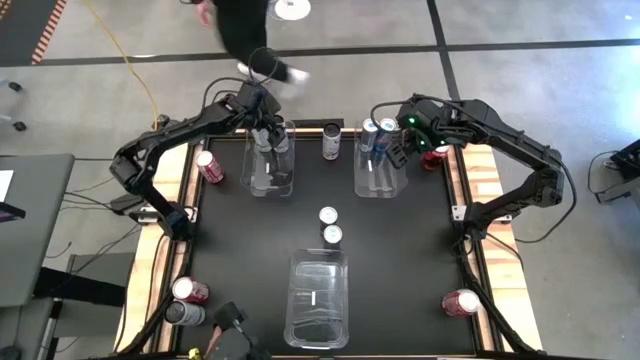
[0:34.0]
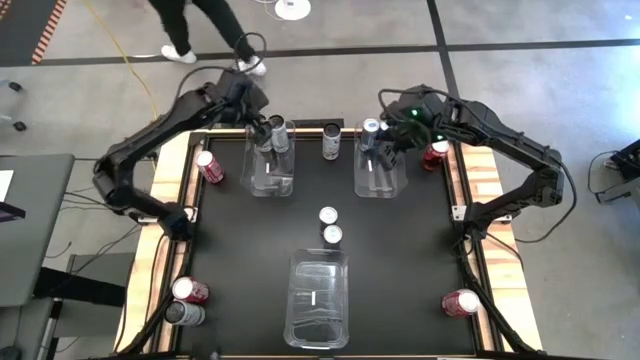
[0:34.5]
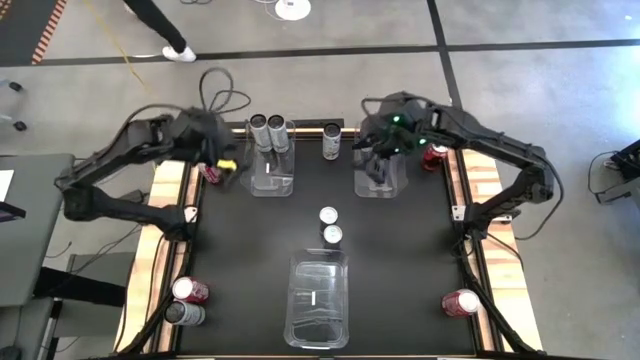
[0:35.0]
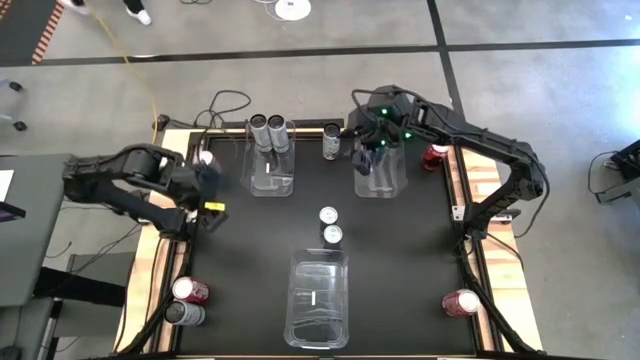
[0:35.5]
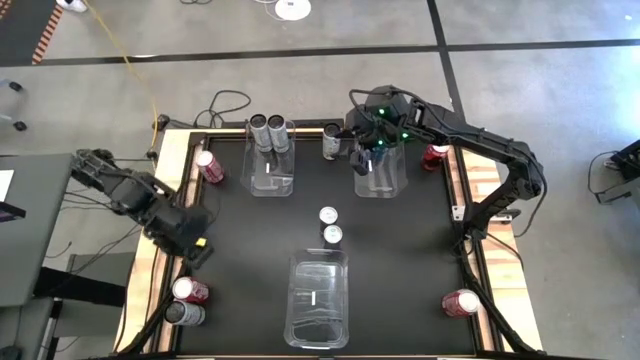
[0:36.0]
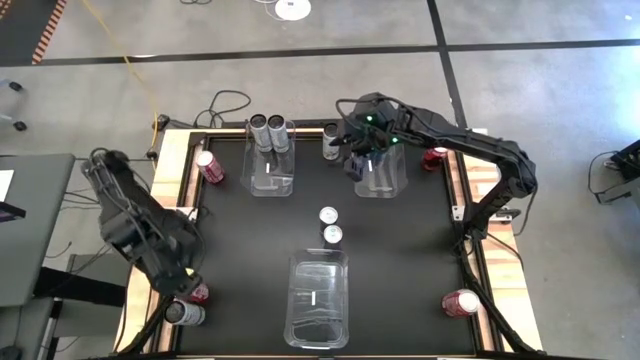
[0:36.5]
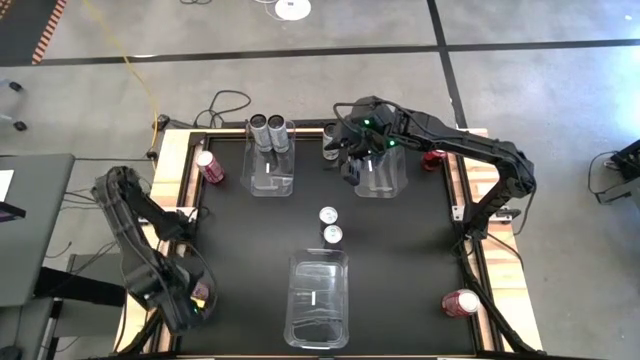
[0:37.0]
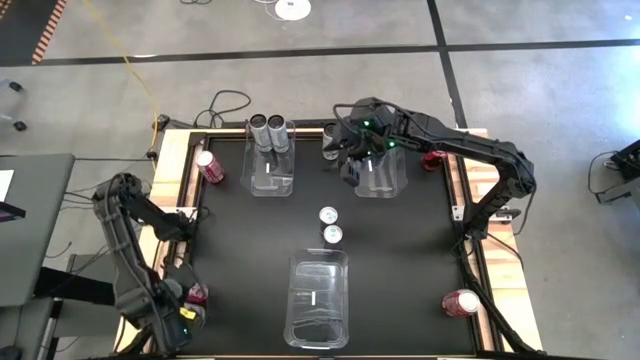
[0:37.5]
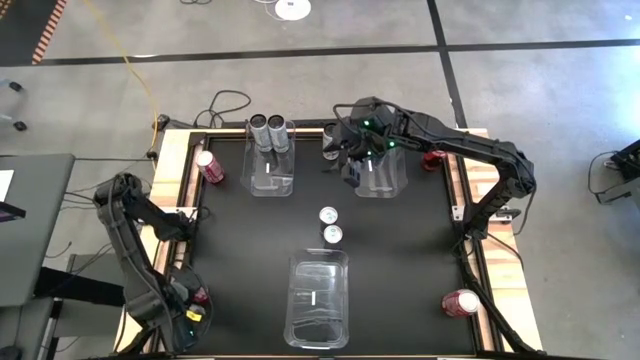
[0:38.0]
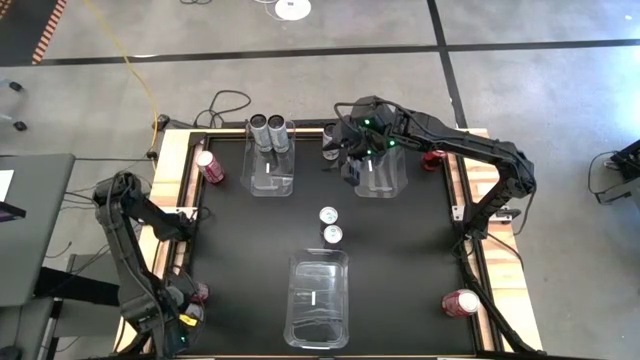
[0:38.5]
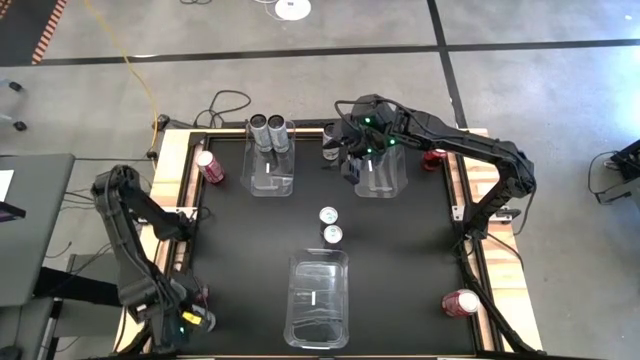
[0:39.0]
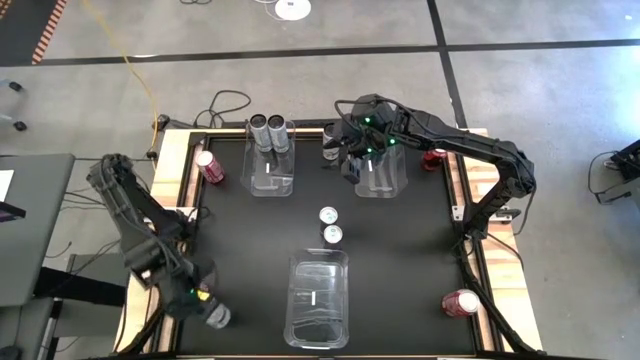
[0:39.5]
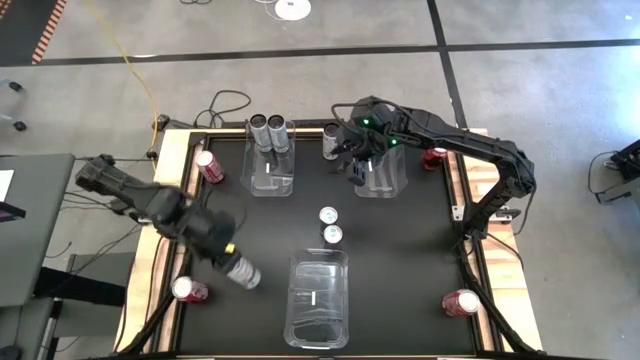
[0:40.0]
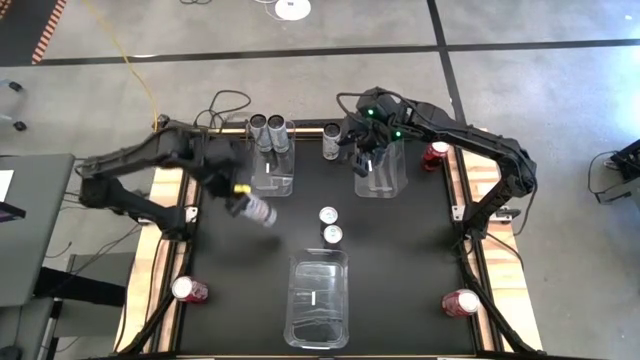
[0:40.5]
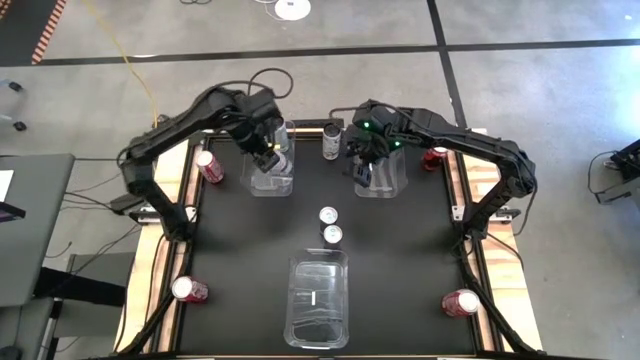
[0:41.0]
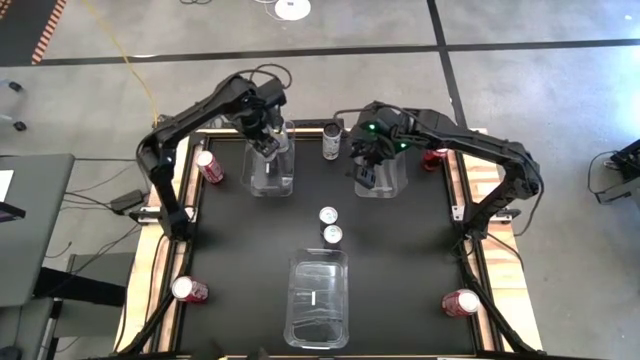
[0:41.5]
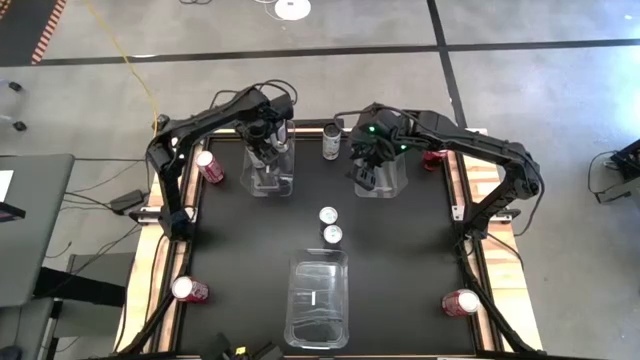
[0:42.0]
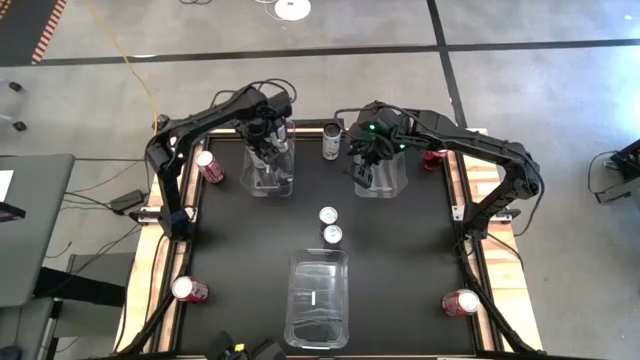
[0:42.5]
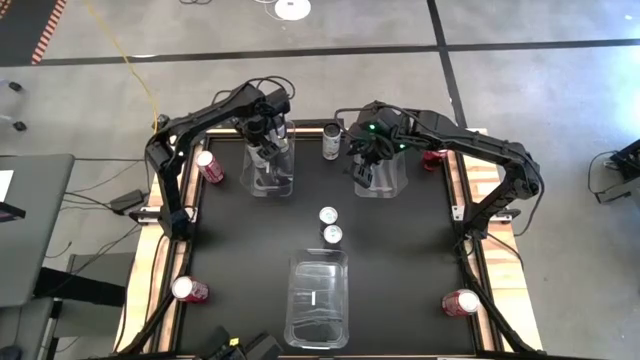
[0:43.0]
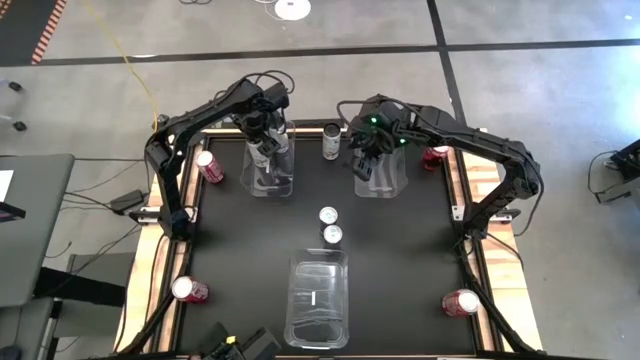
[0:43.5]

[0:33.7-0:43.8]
Task: Sort soda cans
Put the bottom white soda can into the top left transparent bin

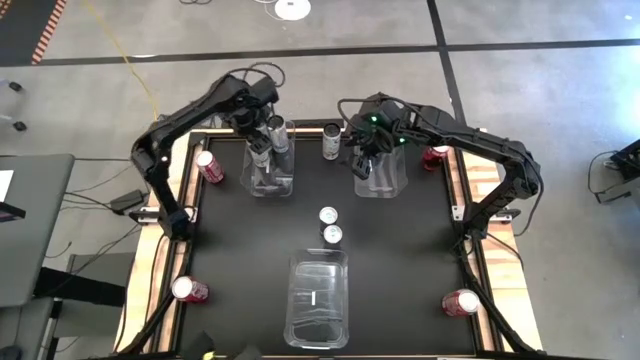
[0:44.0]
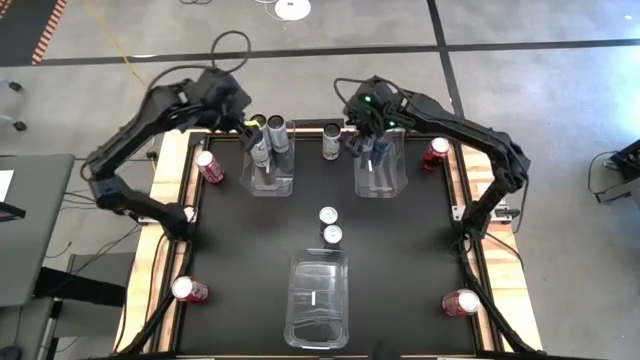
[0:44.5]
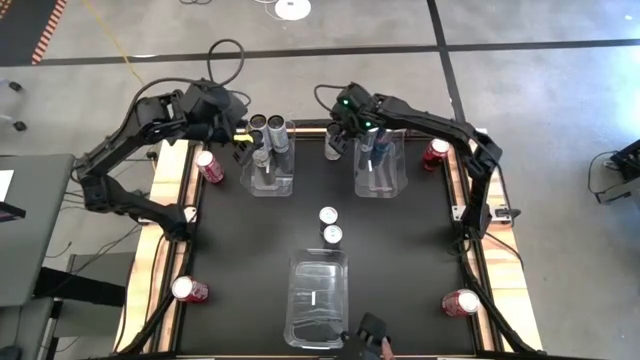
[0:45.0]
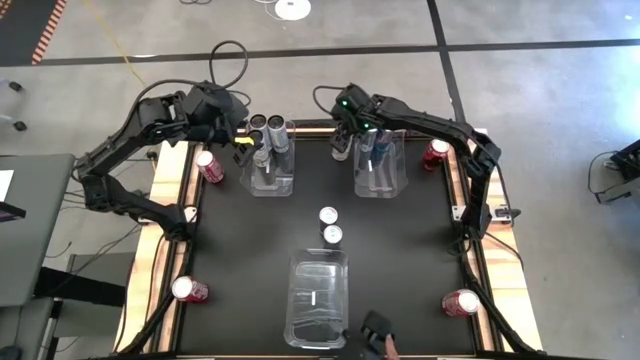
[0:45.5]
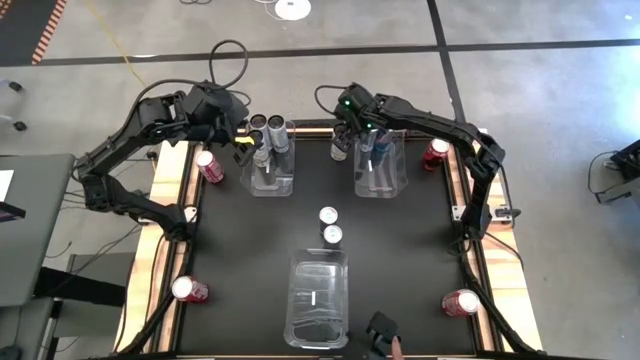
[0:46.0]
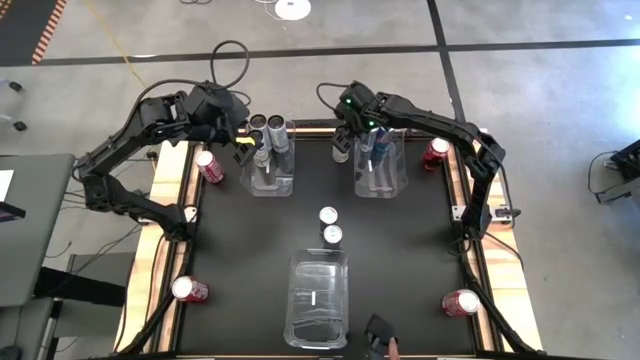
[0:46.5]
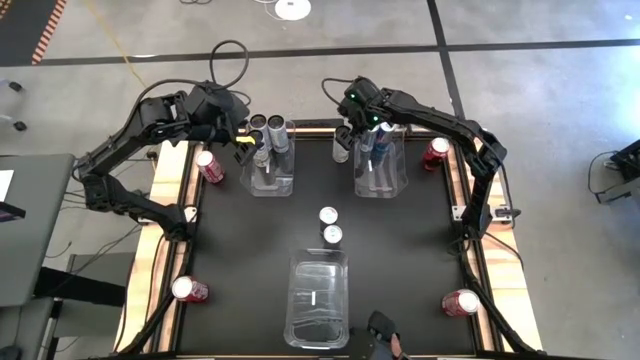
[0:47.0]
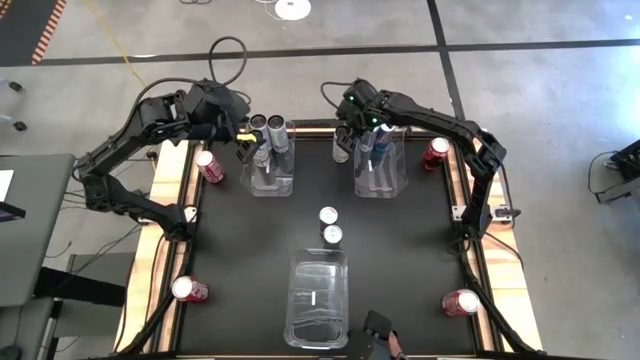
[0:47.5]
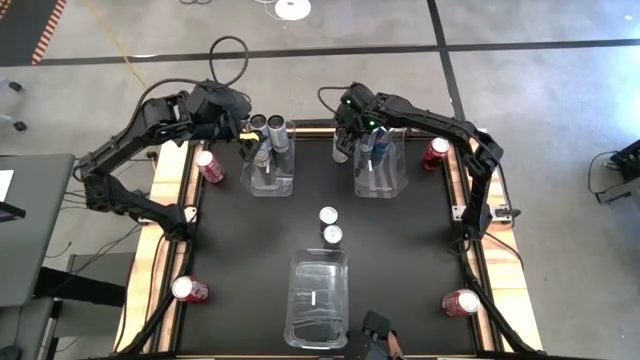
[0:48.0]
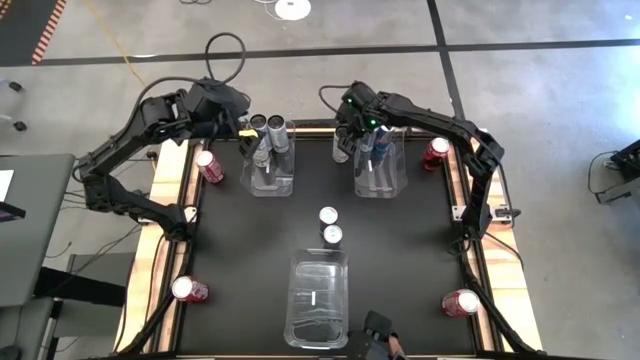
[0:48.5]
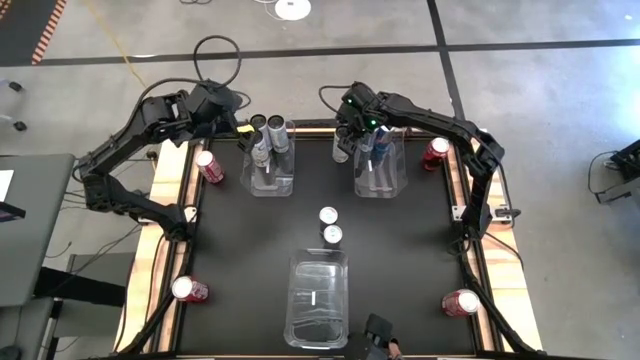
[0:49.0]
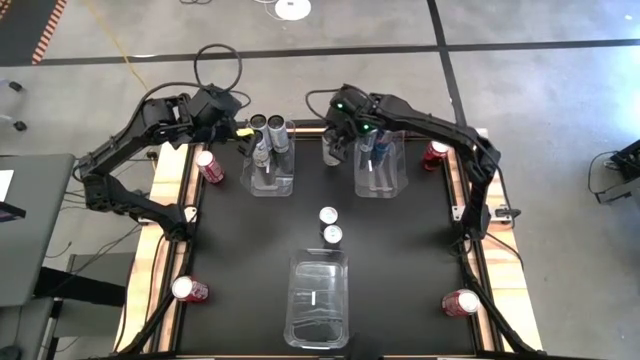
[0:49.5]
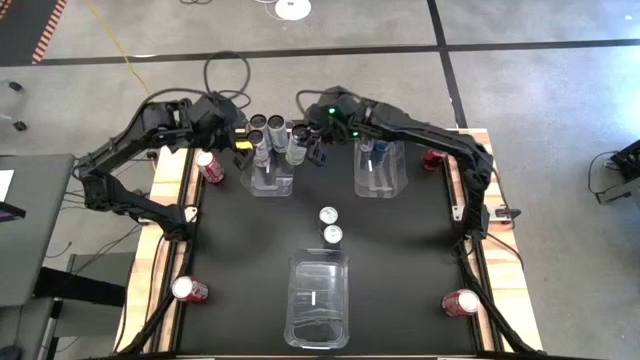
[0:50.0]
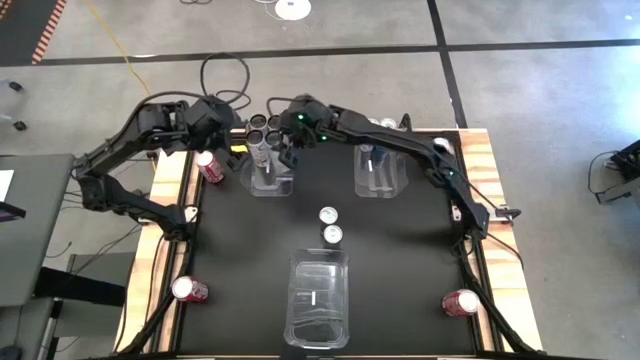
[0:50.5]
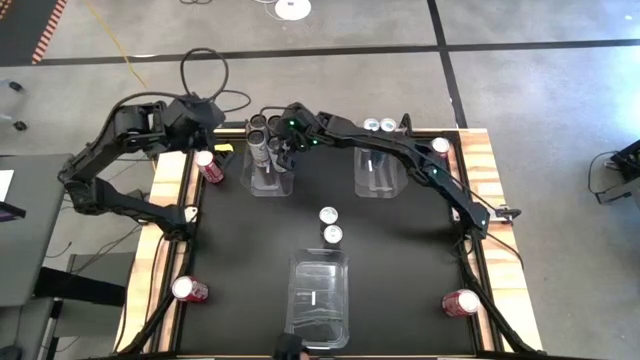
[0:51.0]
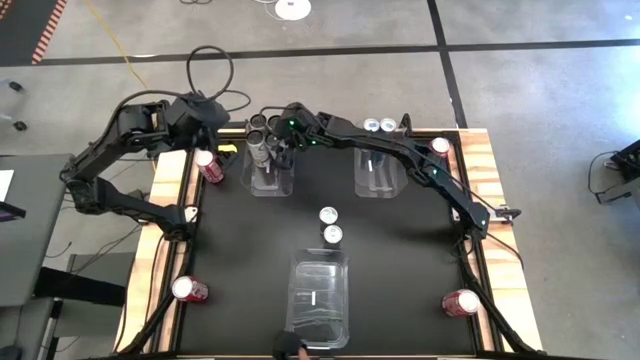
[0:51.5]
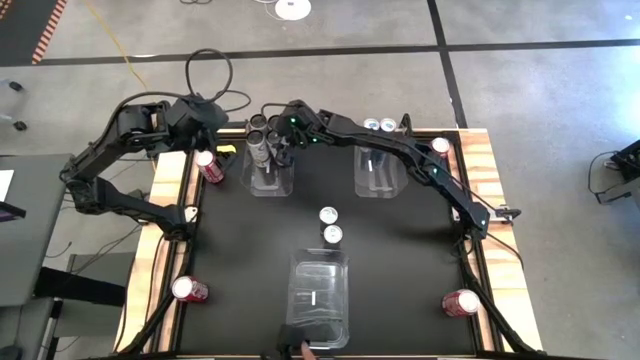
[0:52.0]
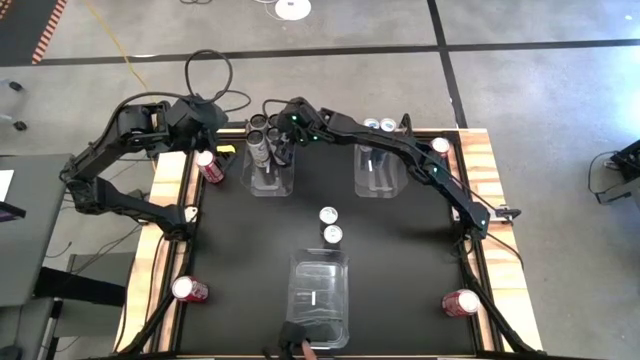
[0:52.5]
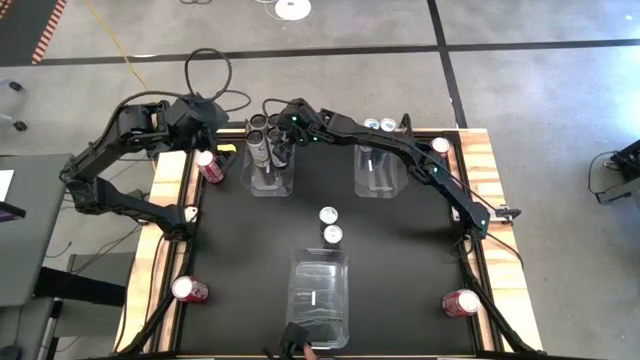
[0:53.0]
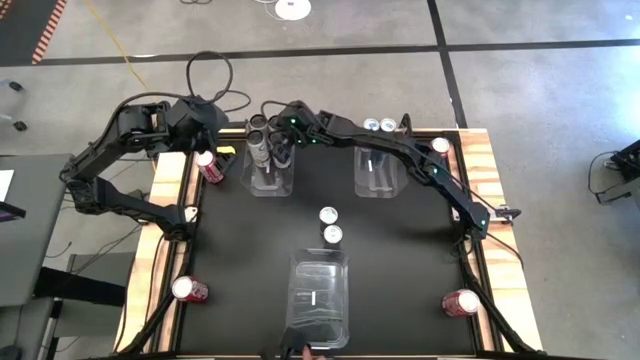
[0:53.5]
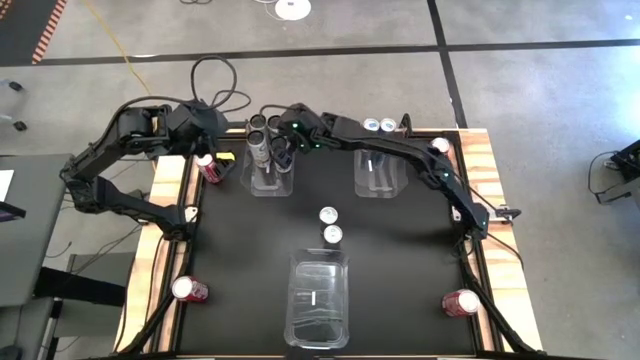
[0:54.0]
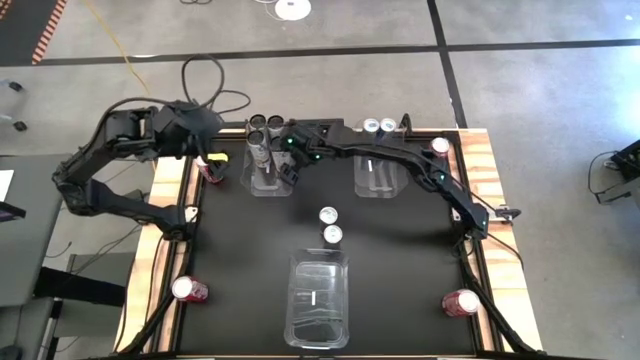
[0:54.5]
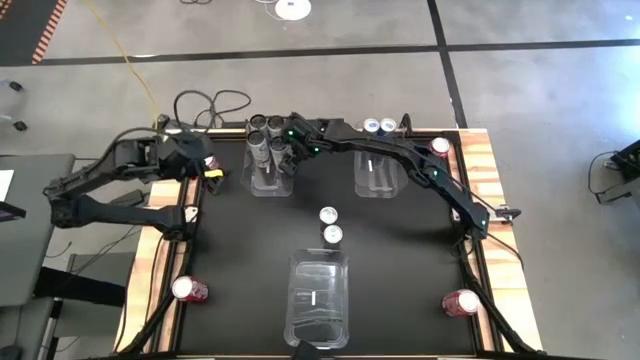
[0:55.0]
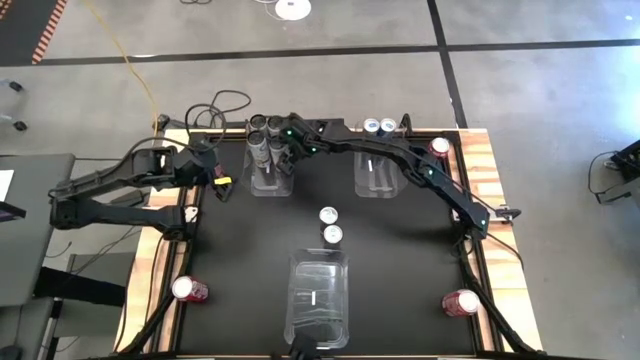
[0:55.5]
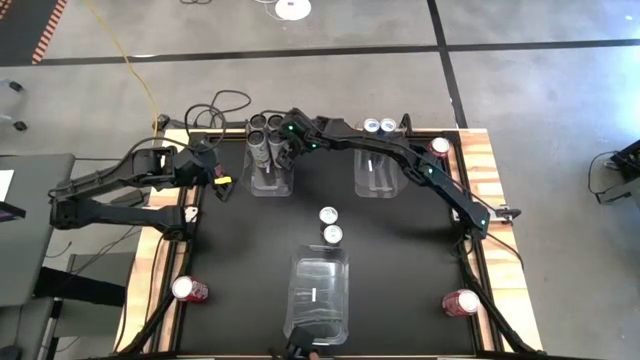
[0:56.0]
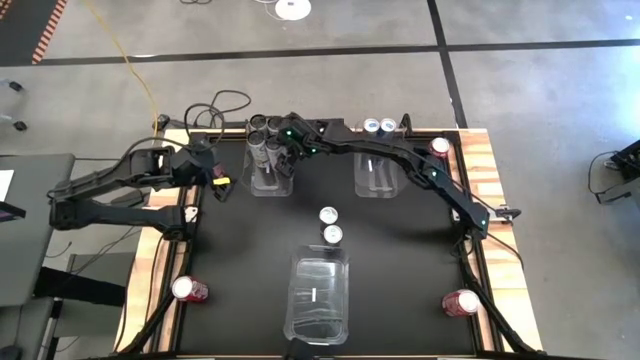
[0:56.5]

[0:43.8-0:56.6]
Put the white soda can into the top left transparent bin
